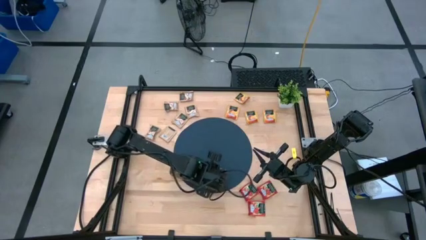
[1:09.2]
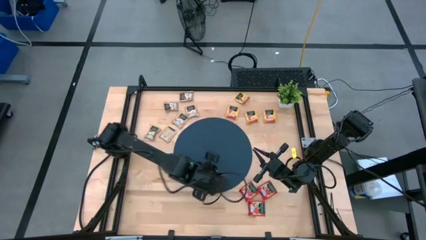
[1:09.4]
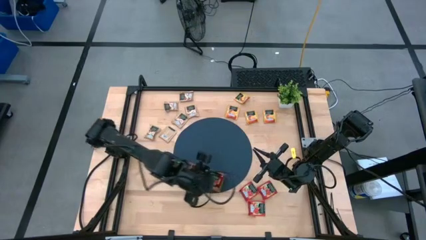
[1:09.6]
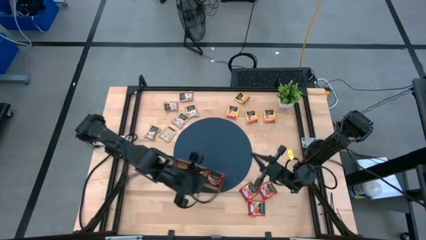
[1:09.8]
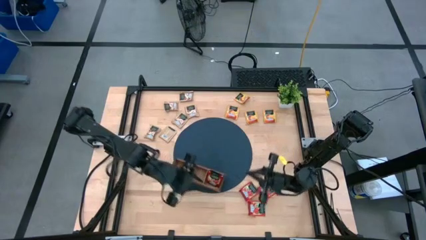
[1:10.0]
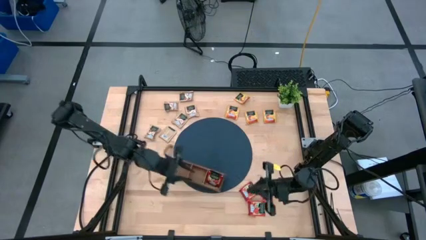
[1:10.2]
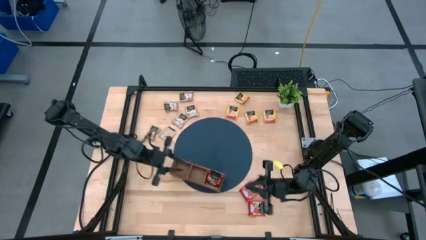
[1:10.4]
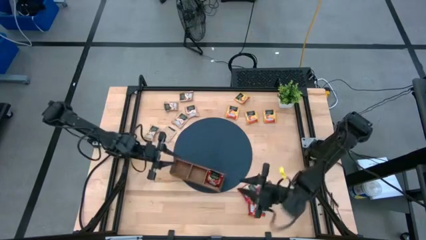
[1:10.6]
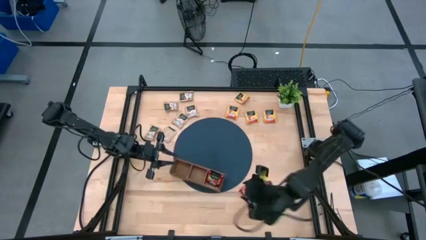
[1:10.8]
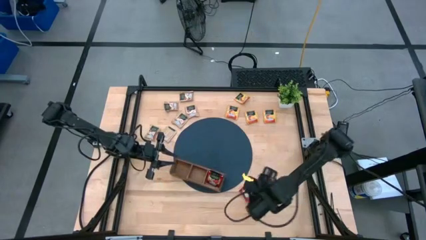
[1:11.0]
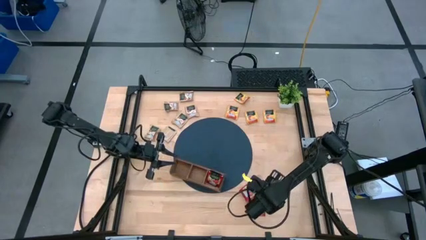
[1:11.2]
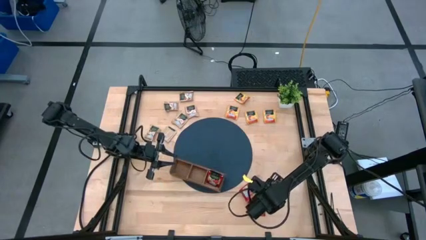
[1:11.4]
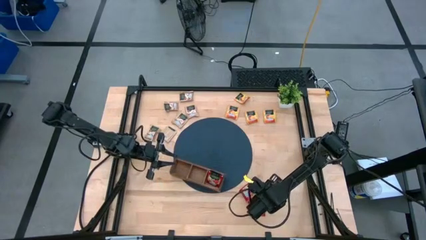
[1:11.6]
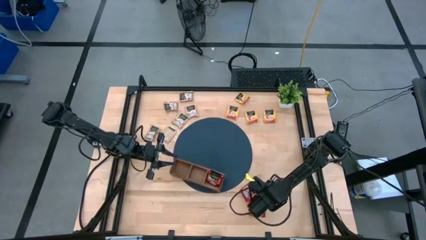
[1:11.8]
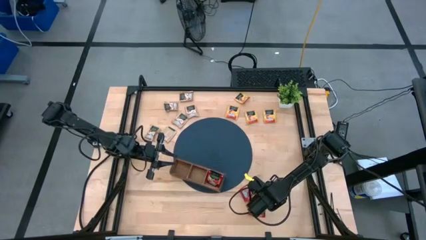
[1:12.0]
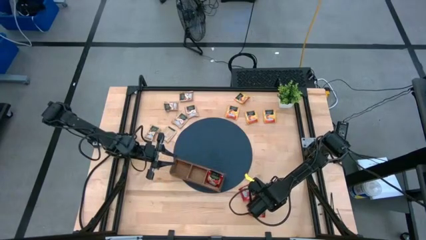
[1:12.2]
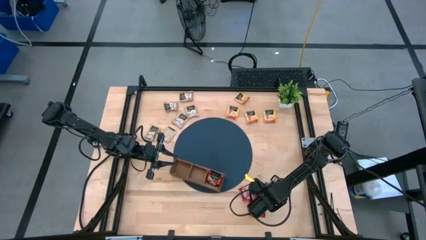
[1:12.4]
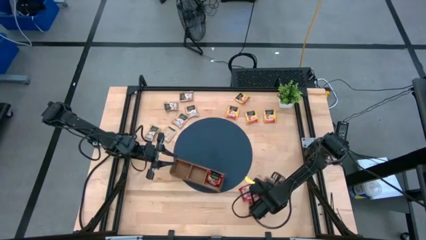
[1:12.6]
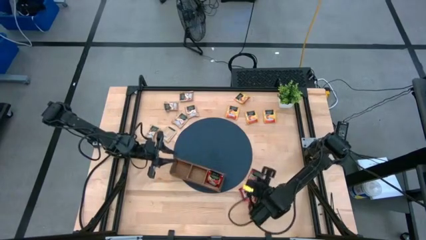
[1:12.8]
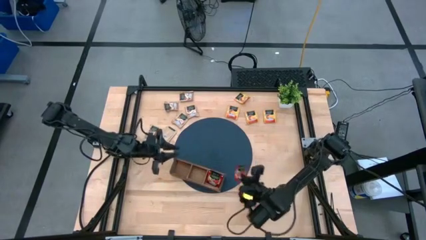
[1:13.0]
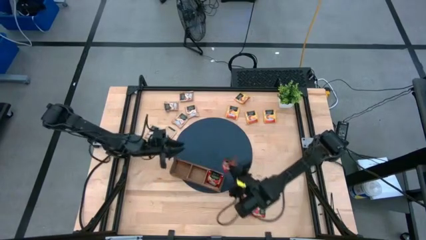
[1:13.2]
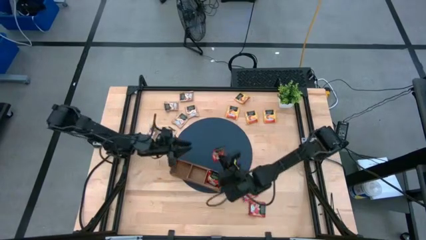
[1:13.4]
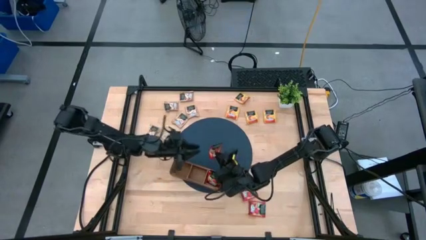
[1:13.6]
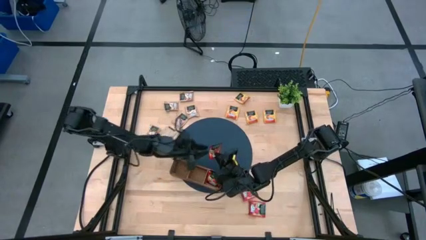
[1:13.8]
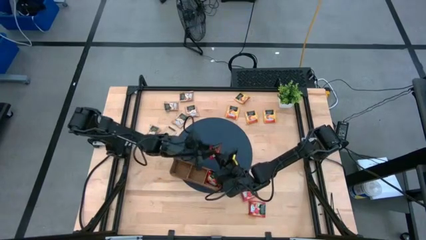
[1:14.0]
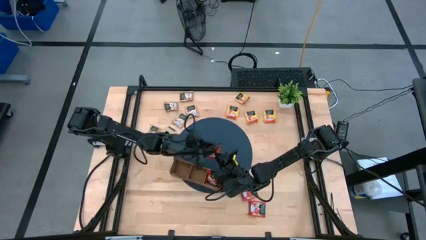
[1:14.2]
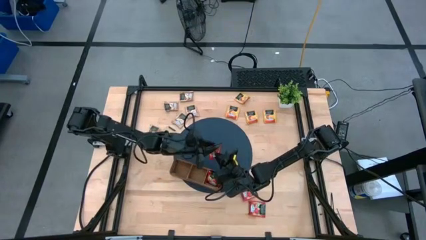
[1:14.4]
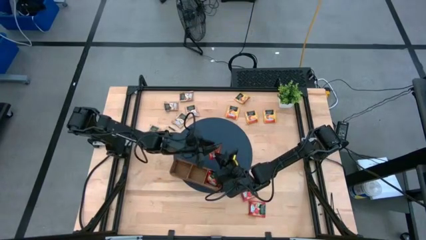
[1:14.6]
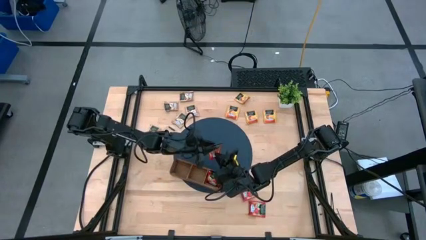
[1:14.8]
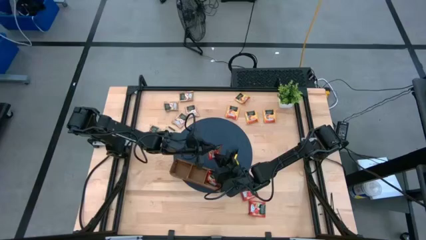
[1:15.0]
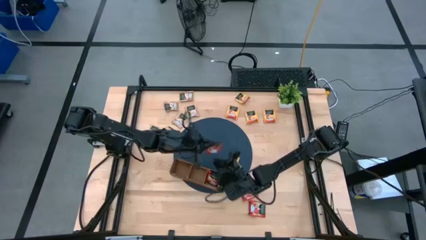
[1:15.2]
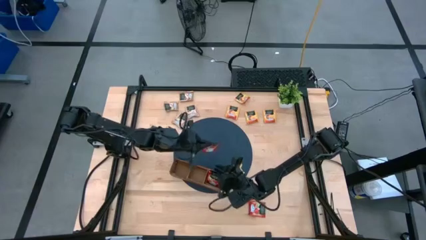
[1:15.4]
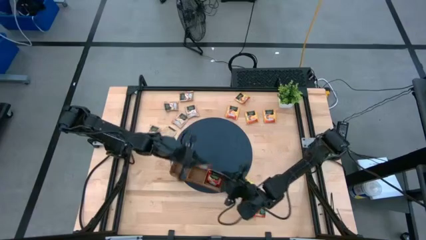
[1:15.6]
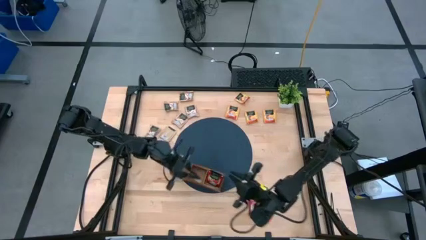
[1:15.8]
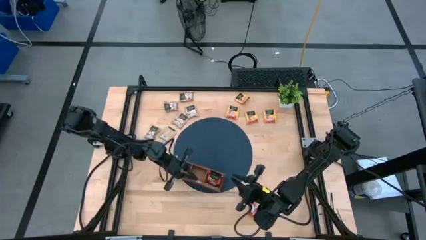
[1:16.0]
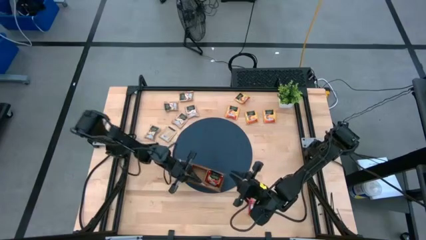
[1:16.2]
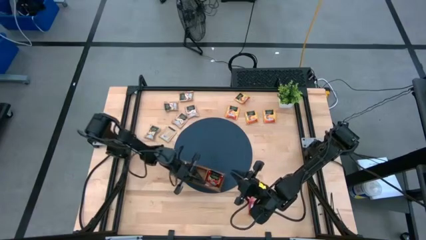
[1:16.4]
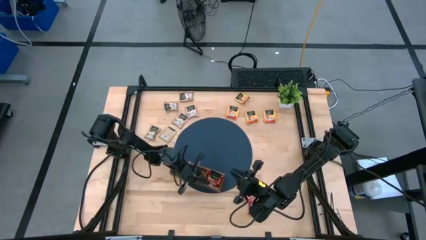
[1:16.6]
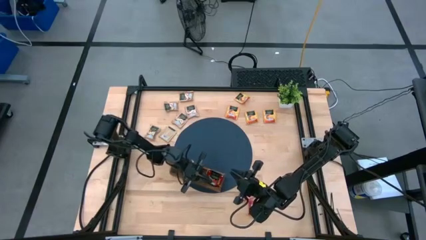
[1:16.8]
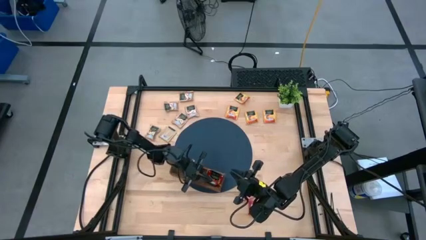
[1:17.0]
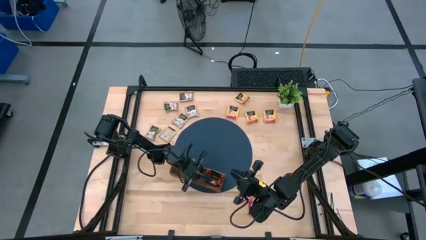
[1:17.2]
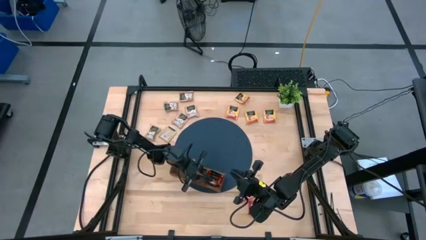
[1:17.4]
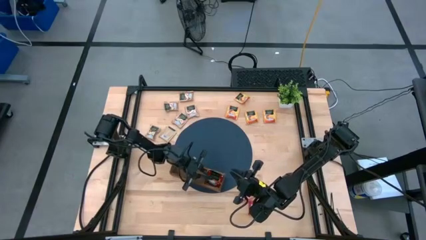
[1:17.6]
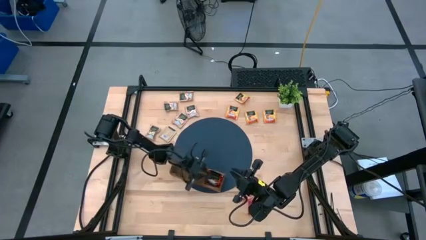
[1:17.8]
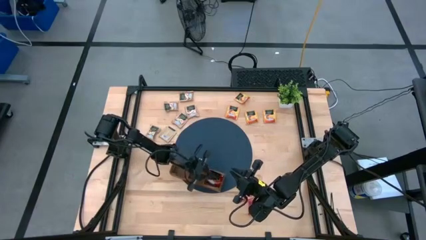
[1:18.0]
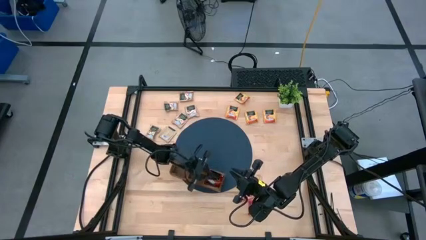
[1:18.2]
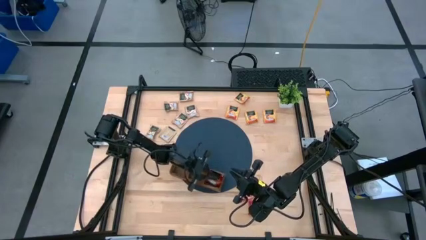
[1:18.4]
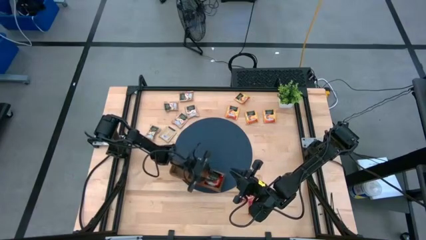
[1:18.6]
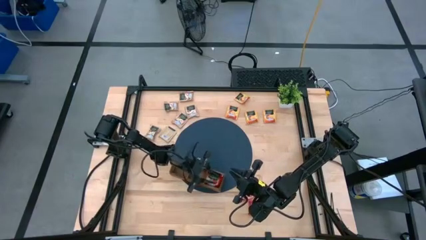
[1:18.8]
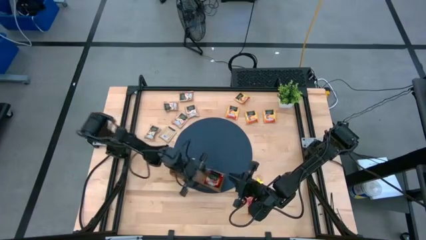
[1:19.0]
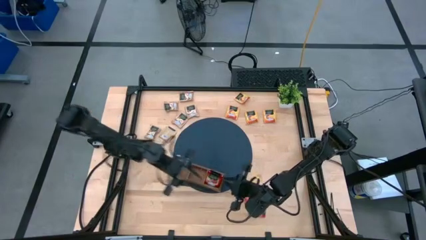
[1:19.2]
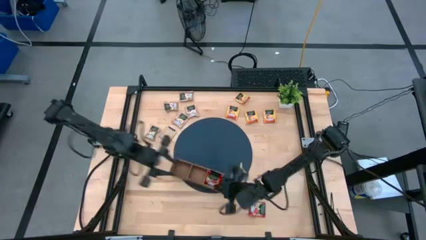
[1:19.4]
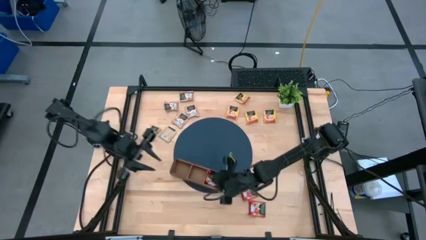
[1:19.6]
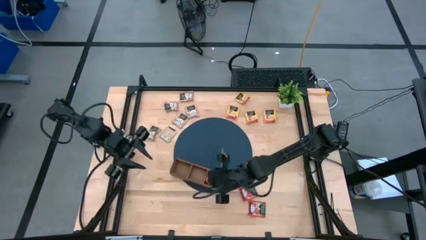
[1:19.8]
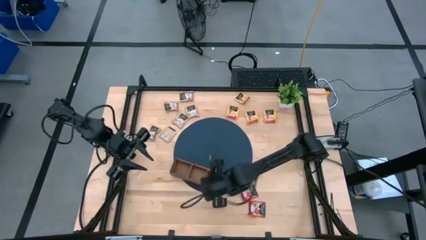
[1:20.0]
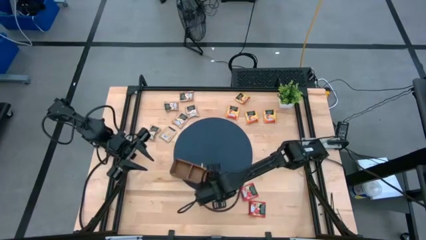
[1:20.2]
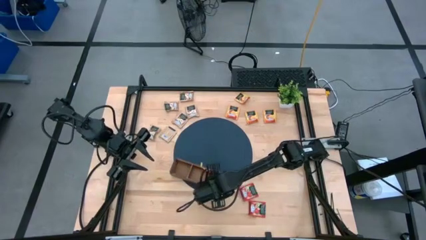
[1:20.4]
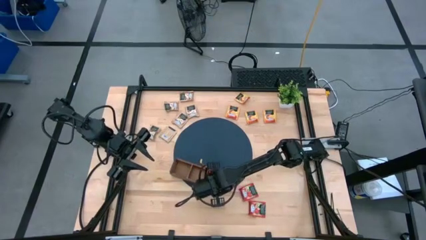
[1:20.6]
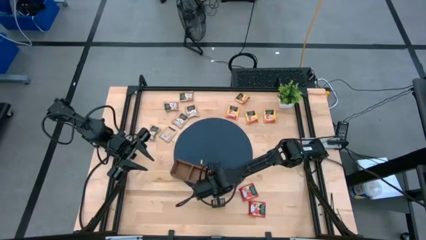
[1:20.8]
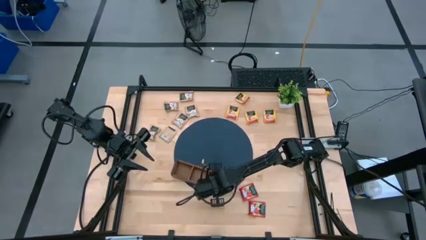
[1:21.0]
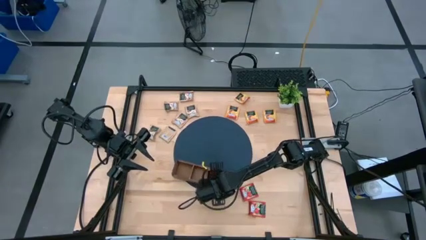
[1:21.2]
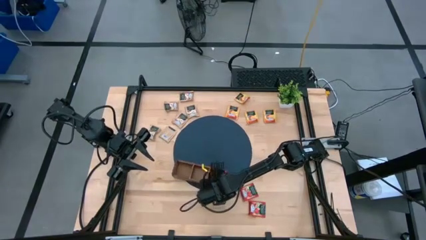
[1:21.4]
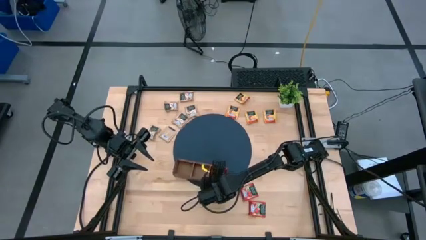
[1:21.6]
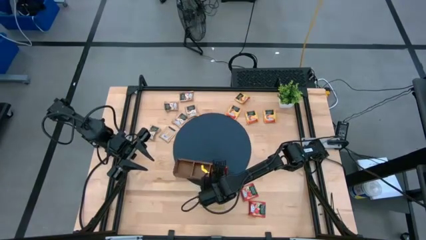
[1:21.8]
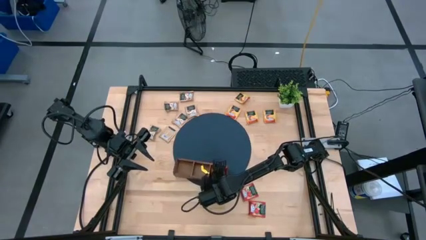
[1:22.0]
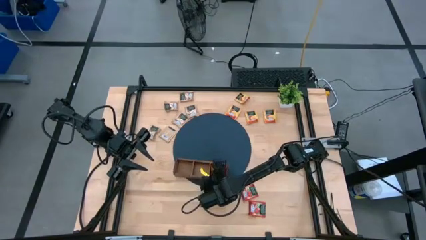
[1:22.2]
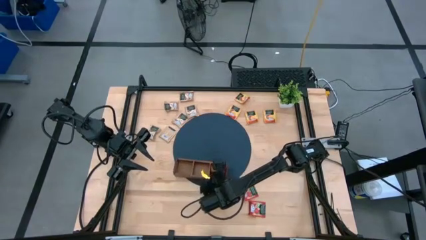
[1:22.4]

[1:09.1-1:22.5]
Task: Pick & Place Tea
Put the red tea bag into the right section of the wooden organizer

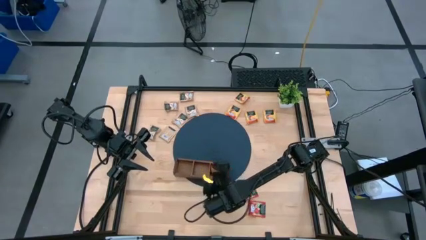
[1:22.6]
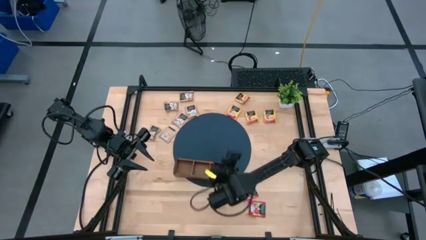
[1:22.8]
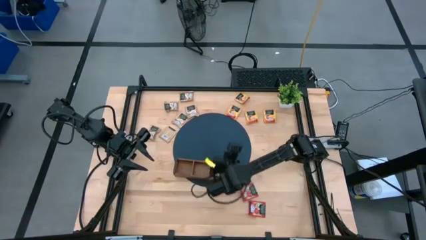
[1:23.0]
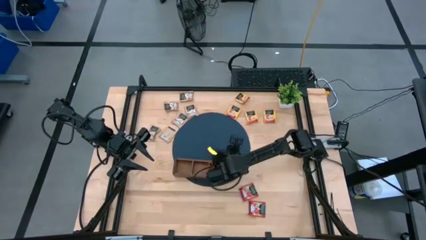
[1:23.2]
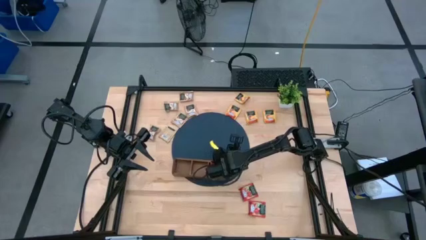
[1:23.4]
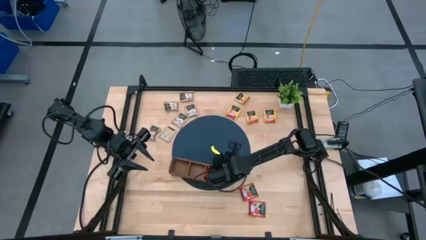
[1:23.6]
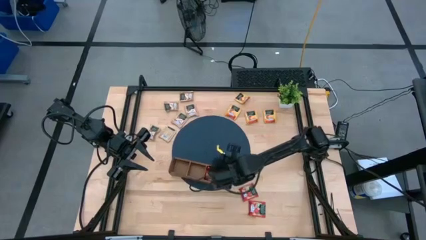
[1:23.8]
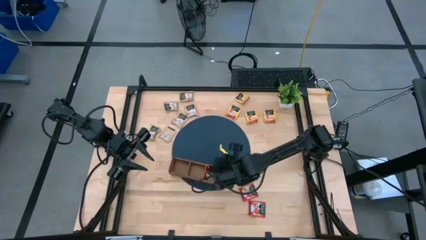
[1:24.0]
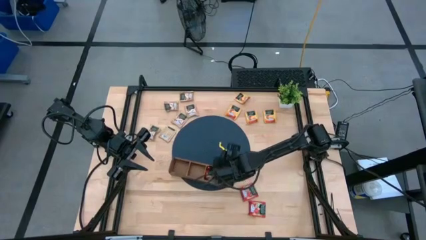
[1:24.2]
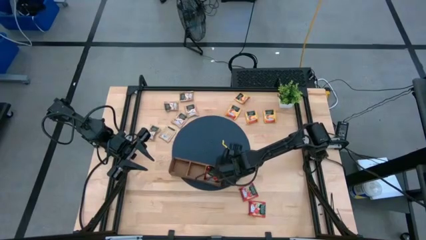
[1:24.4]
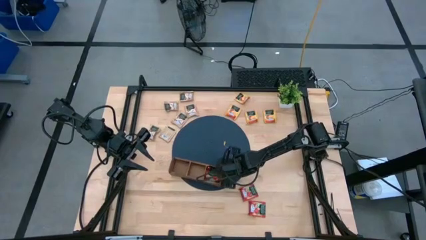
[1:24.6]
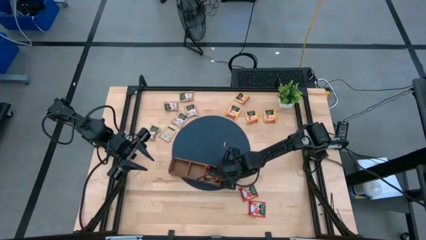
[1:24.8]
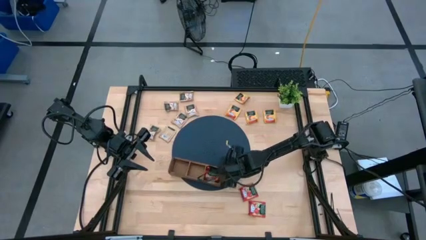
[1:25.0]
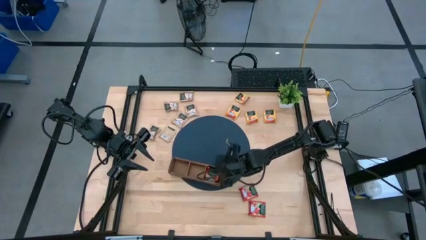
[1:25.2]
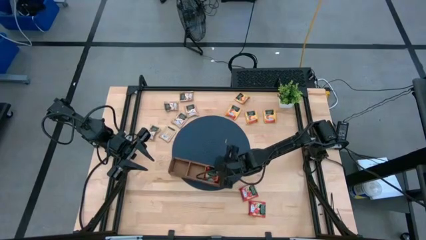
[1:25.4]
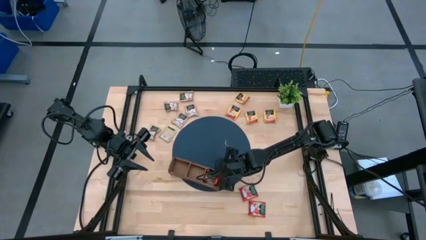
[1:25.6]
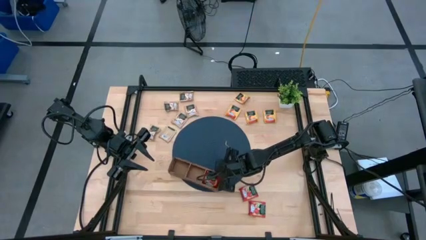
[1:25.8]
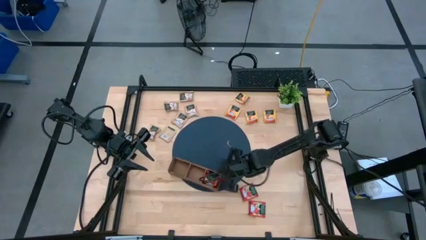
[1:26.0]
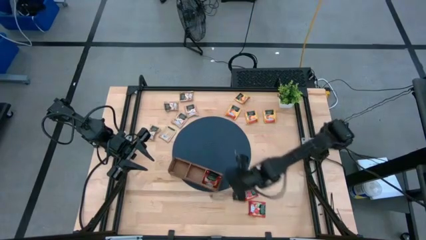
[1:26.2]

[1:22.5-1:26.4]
Adjust the wooden organizer
